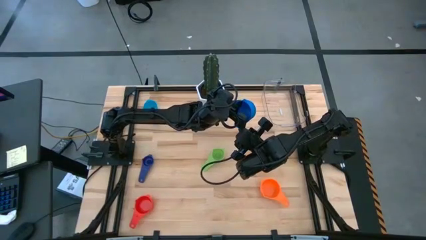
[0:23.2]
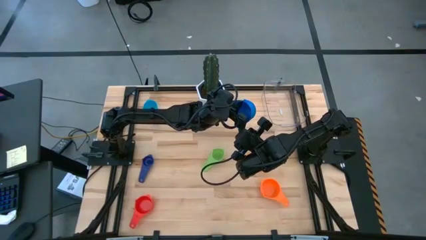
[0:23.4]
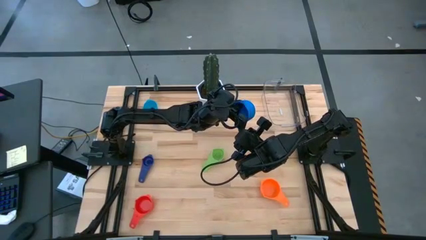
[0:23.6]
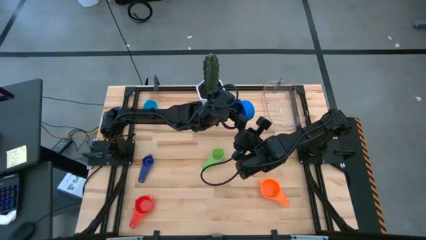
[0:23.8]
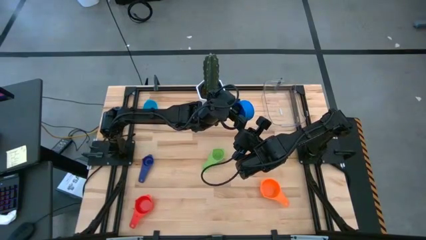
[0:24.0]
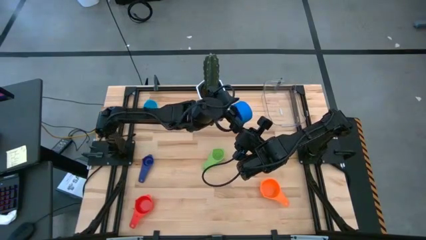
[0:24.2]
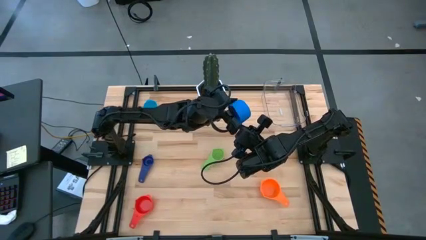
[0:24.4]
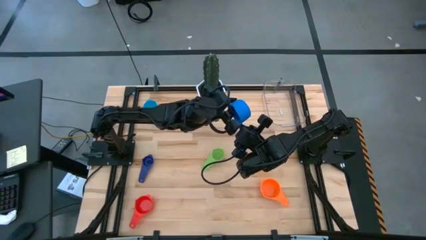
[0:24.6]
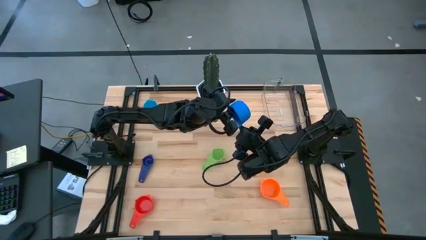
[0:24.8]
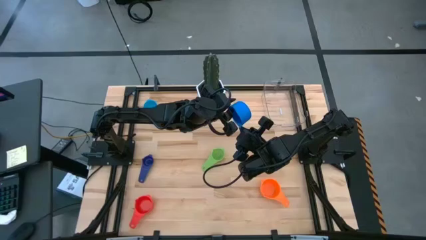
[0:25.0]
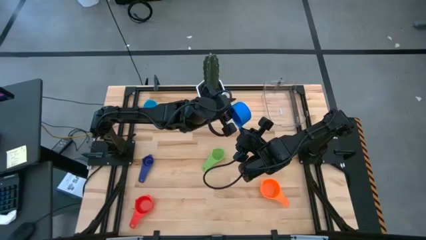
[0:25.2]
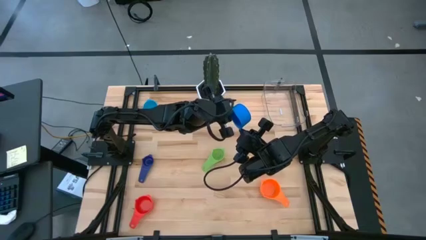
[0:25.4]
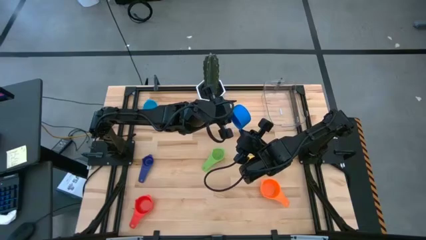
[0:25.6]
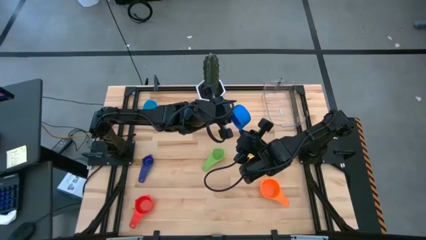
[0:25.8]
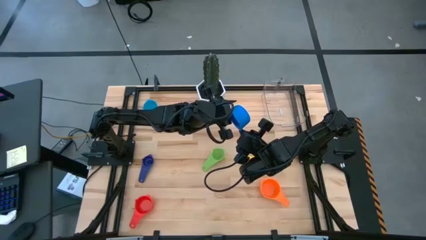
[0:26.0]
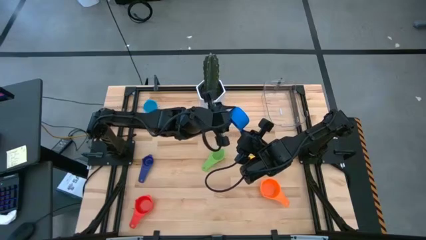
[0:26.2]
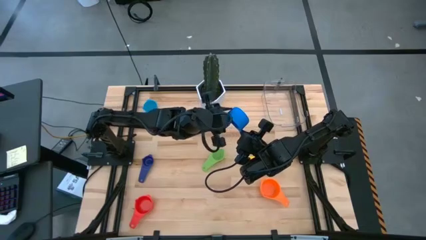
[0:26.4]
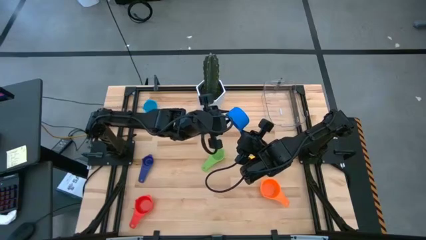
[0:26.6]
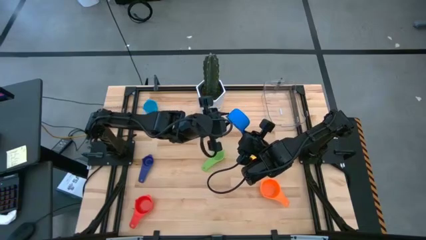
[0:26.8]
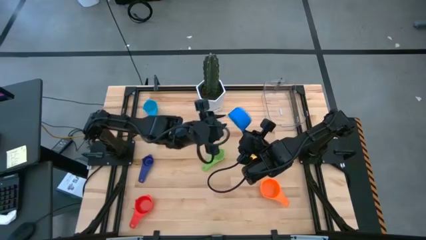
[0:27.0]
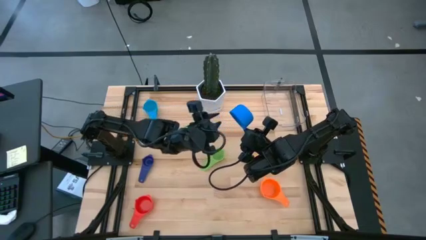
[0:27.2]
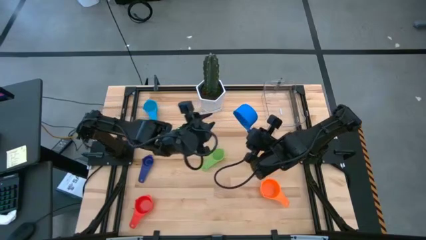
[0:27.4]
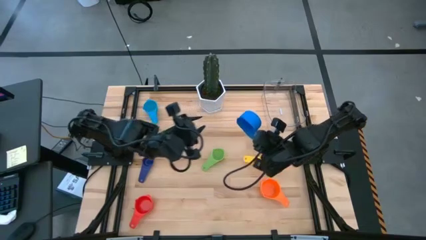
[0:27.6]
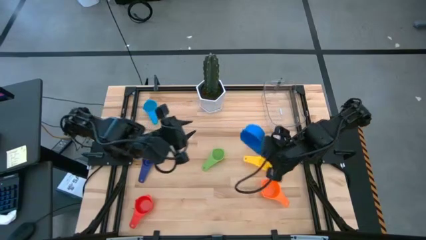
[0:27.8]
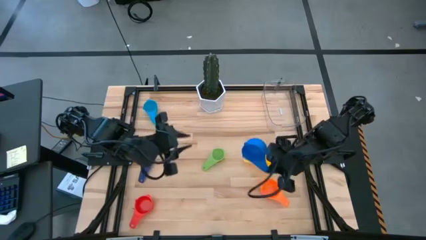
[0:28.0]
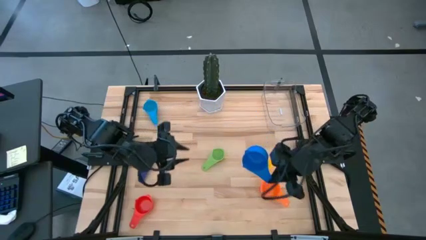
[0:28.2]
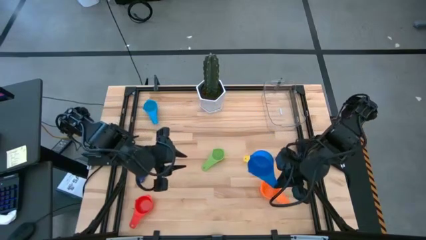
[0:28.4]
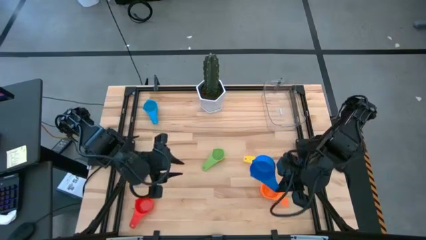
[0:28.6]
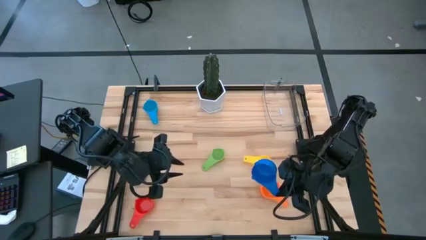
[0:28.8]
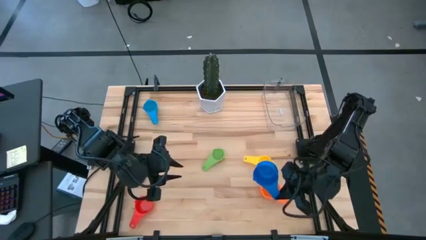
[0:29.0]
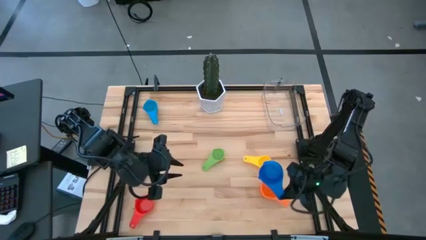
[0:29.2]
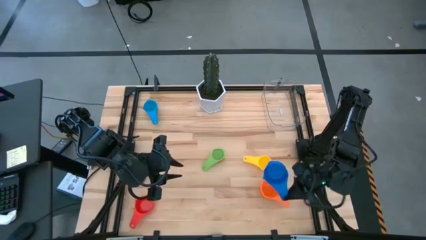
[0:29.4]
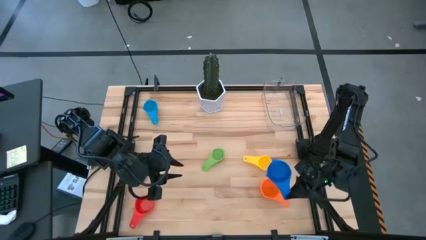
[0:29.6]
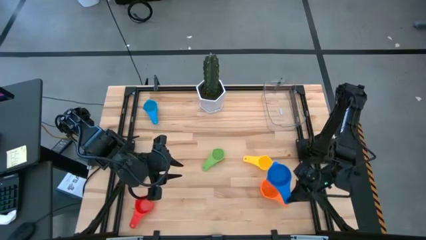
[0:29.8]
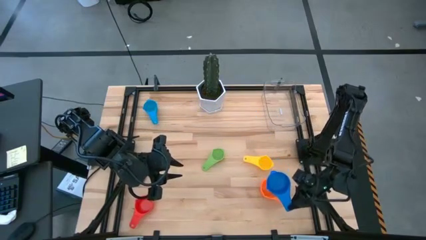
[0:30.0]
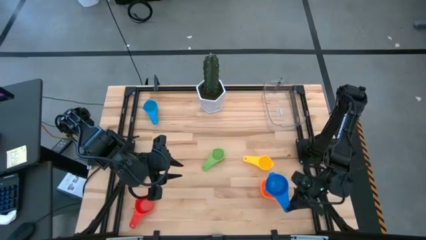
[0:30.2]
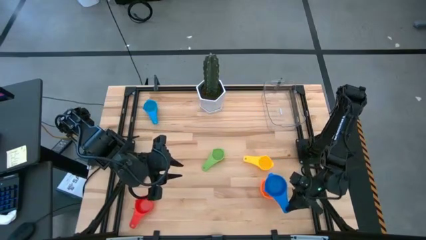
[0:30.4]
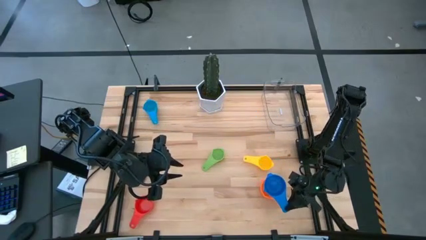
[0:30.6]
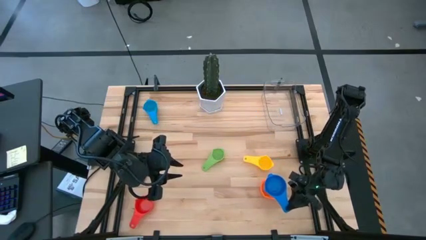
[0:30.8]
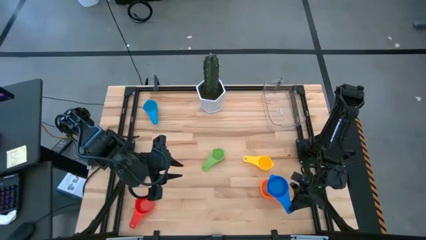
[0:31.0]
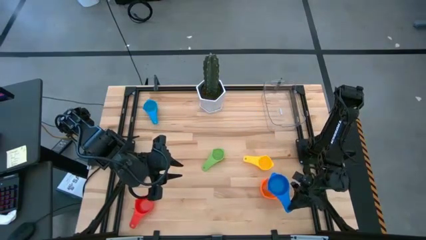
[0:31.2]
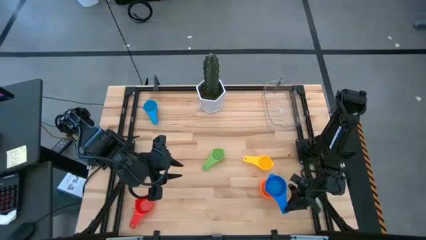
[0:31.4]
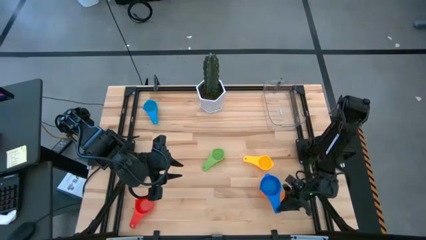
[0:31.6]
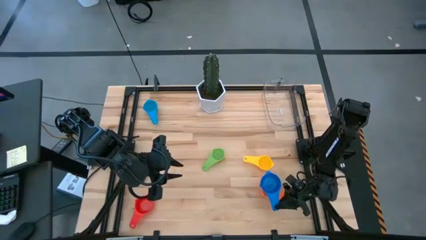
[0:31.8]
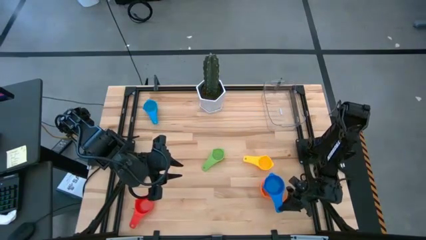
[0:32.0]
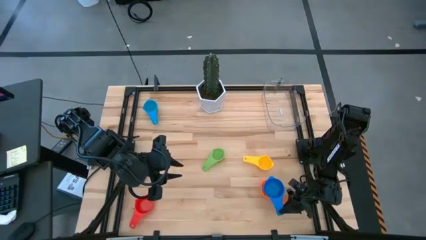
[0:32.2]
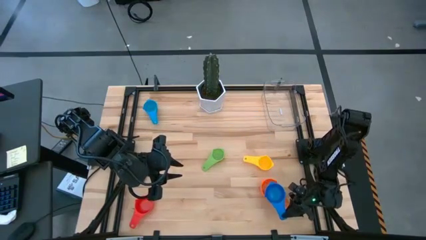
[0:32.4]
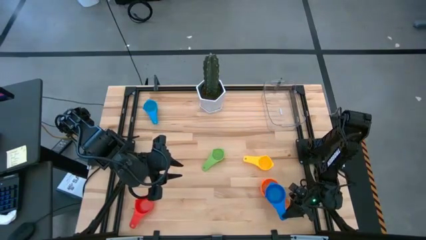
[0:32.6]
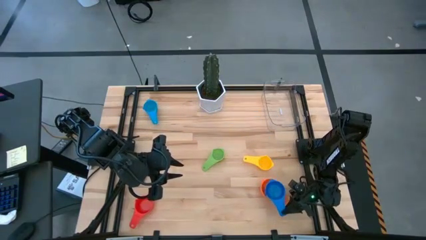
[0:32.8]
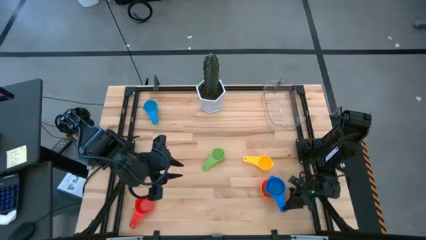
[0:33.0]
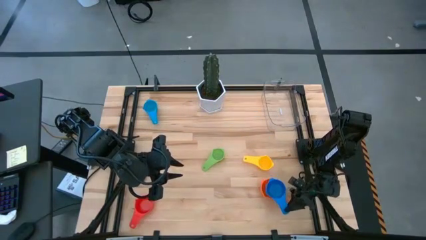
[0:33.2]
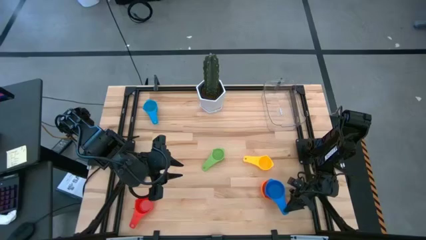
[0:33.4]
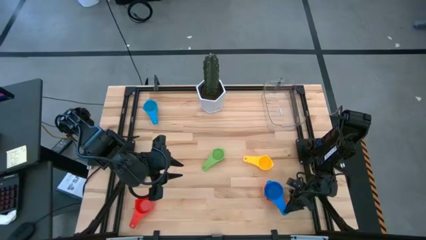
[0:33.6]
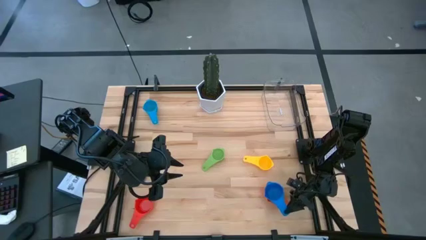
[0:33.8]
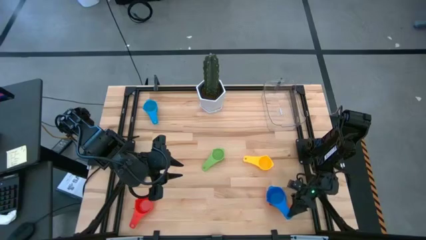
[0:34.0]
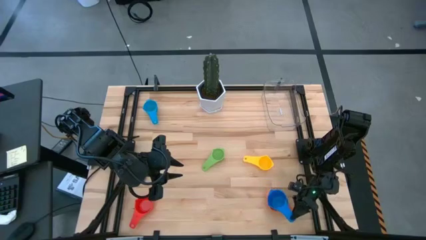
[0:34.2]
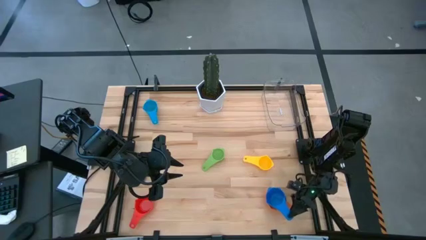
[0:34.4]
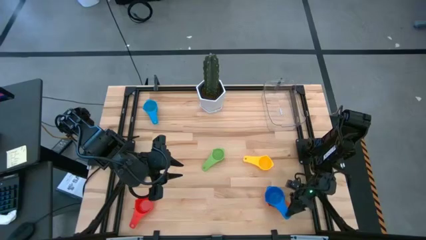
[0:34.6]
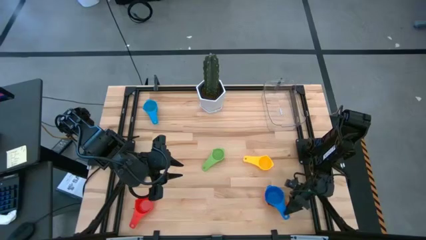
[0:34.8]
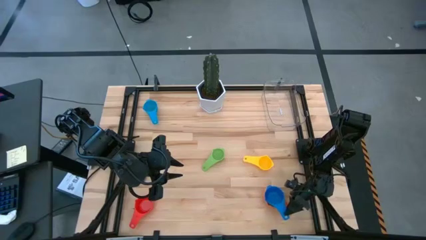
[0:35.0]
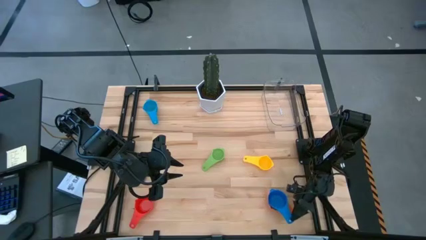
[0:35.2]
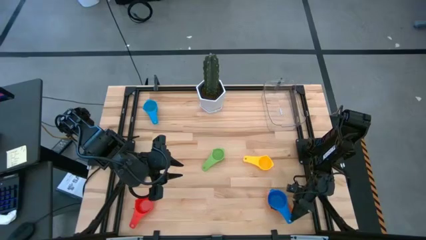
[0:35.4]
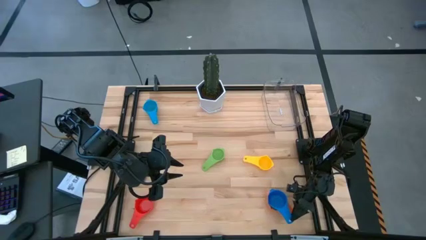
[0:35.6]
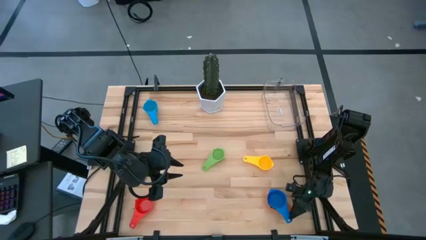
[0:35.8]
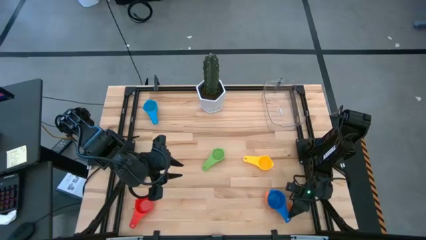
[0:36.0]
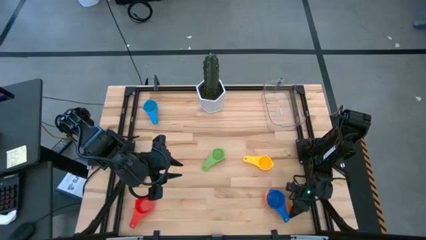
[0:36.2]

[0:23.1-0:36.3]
Task: Nest measuring cups in basket
Stack the blue measuring cup on top of the orange measuring cup
